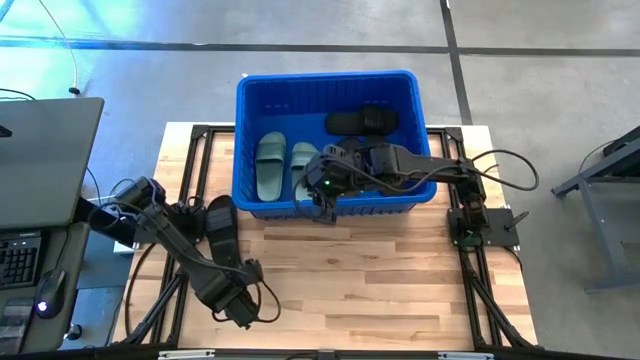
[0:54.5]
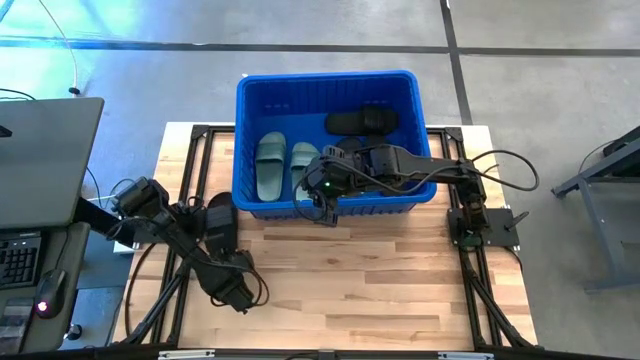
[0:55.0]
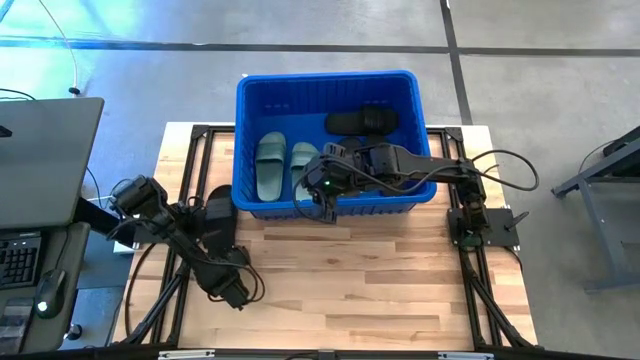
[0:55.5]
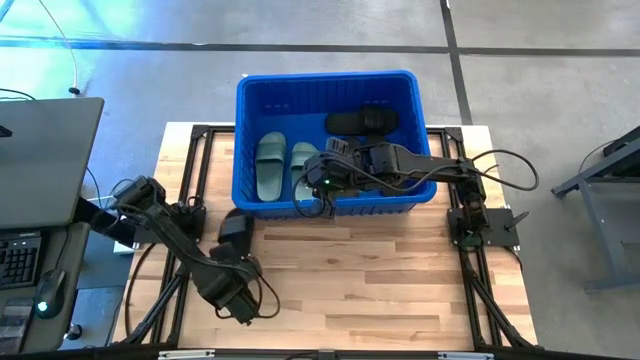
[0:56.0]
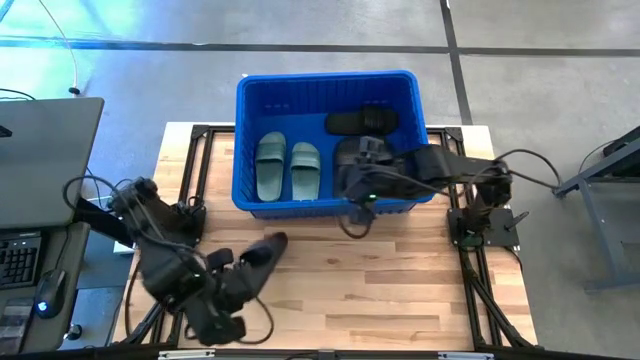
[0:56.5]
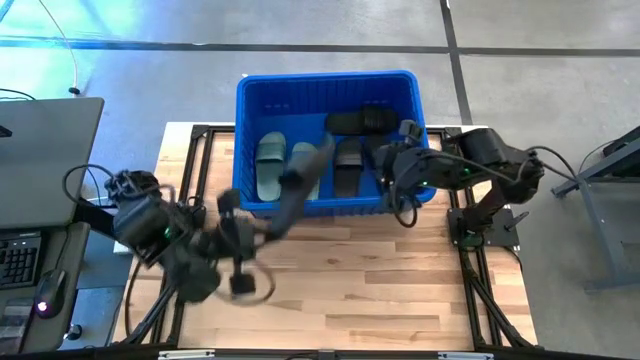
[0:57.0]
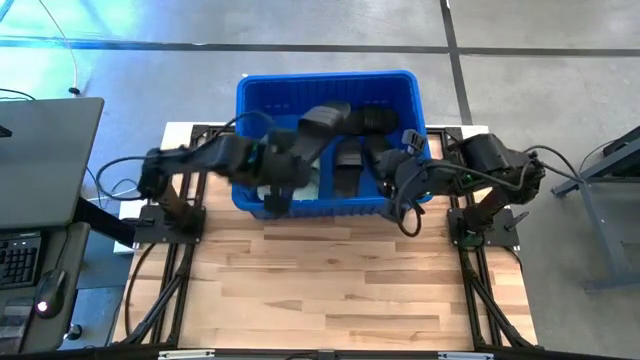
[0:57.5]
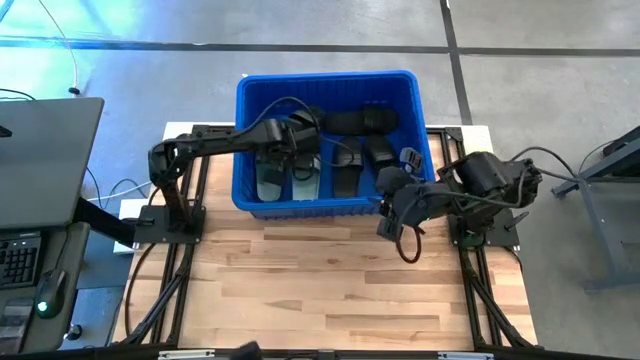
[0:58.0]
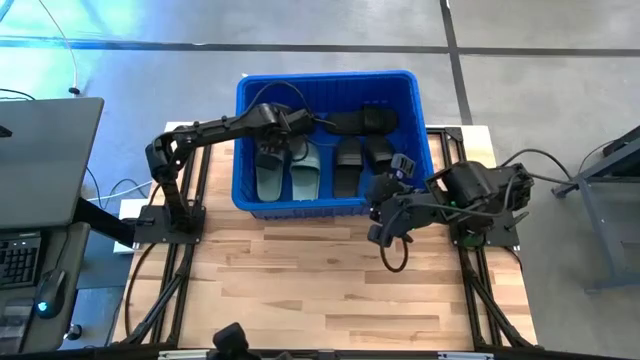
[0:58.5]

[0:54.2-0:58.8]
Task: Pick and place slides into bin
Put the black slide into the blue bin

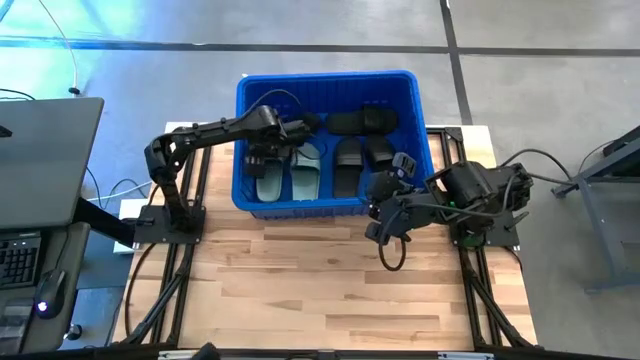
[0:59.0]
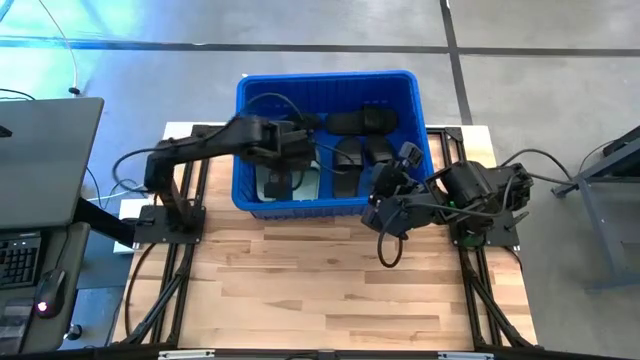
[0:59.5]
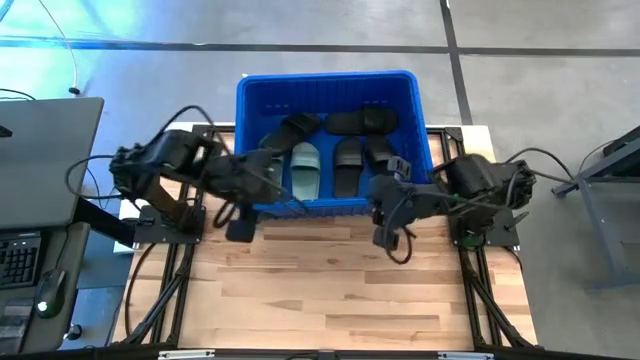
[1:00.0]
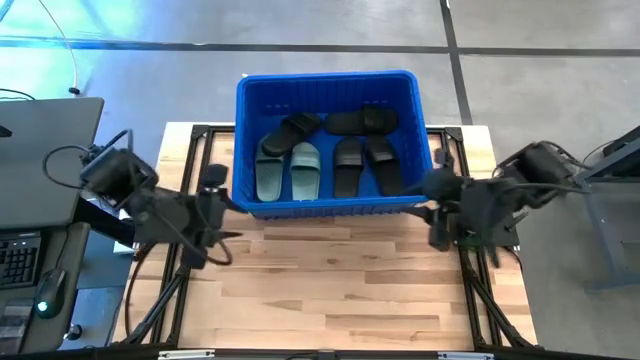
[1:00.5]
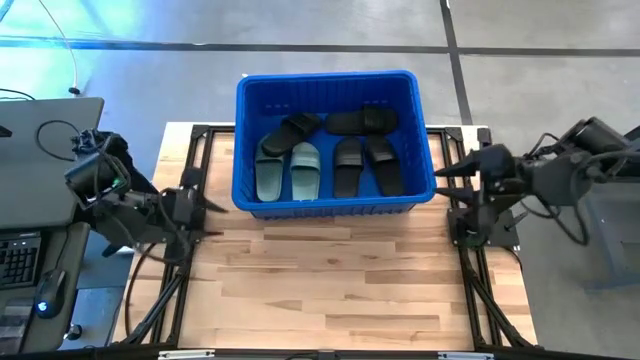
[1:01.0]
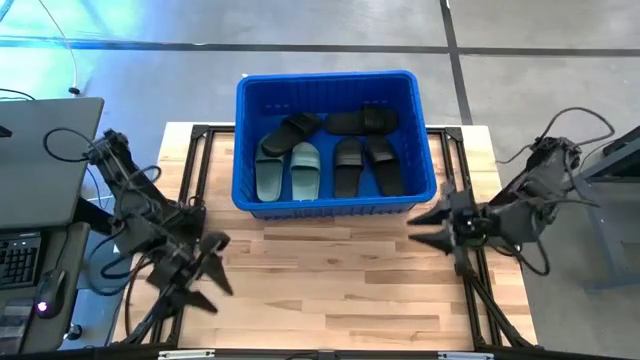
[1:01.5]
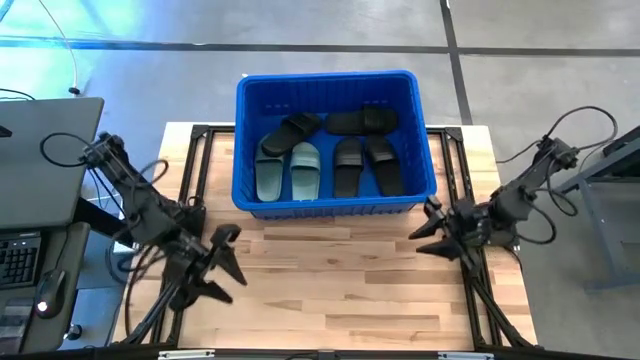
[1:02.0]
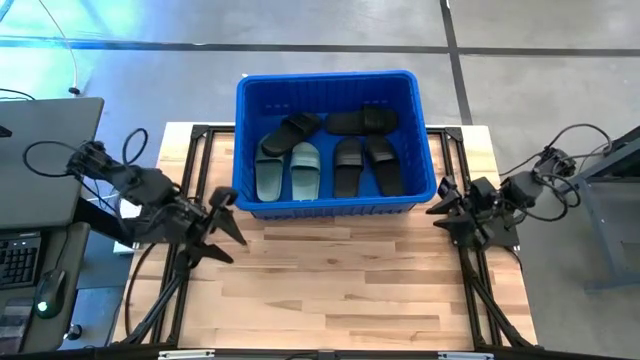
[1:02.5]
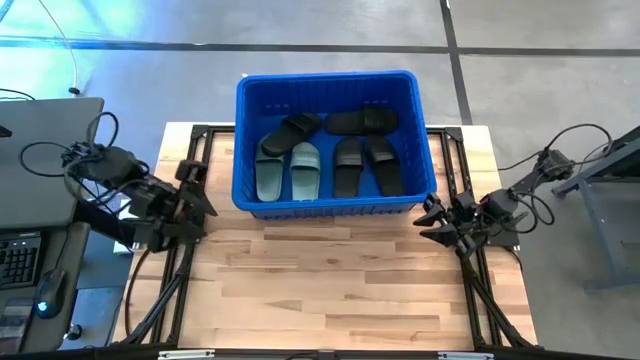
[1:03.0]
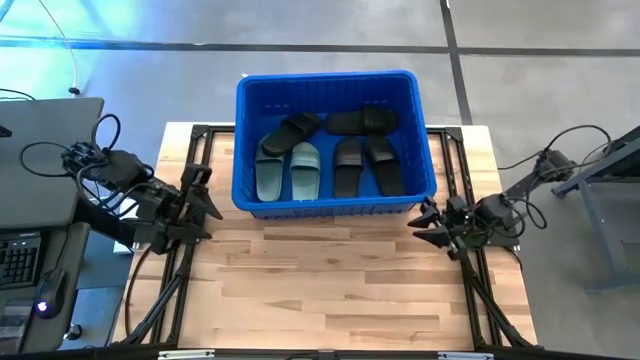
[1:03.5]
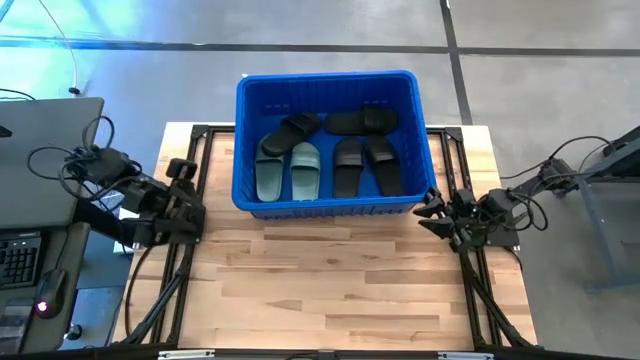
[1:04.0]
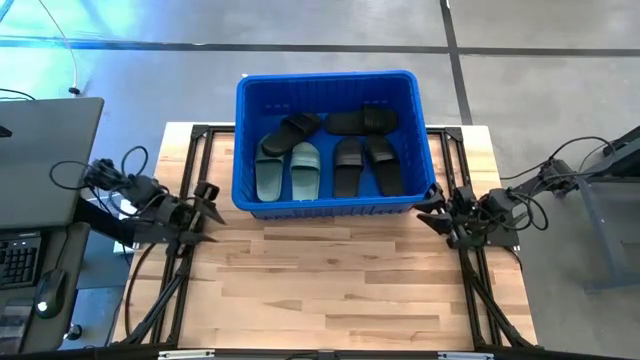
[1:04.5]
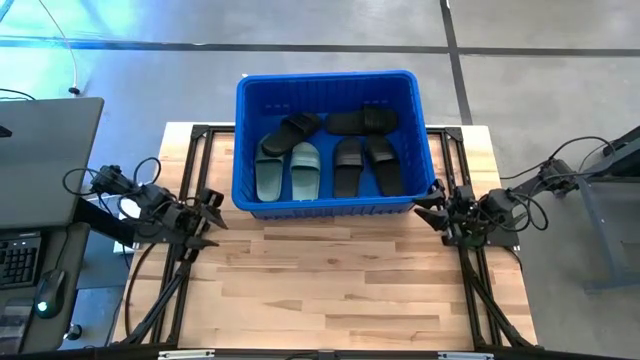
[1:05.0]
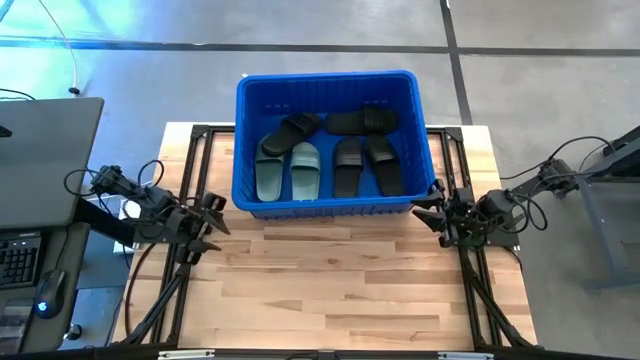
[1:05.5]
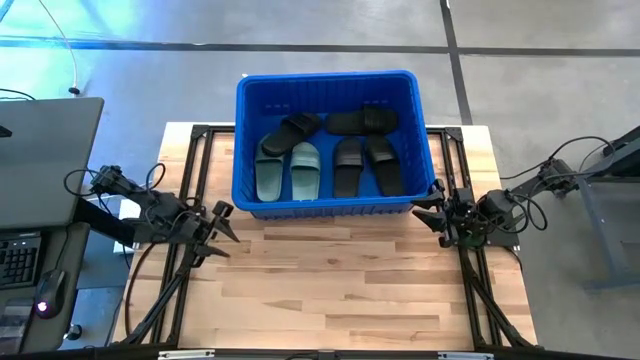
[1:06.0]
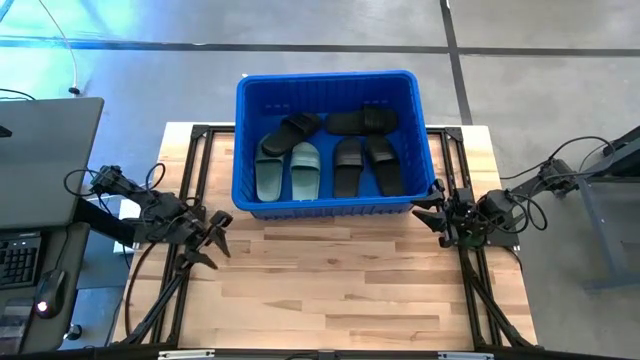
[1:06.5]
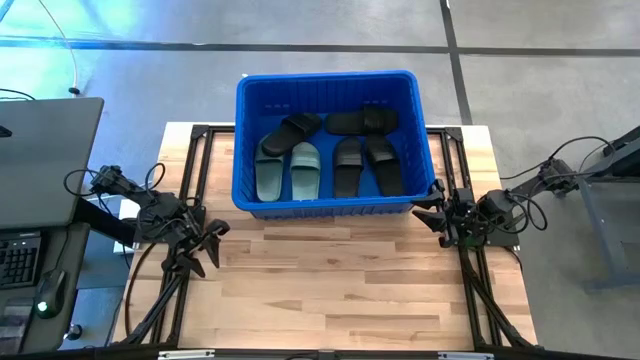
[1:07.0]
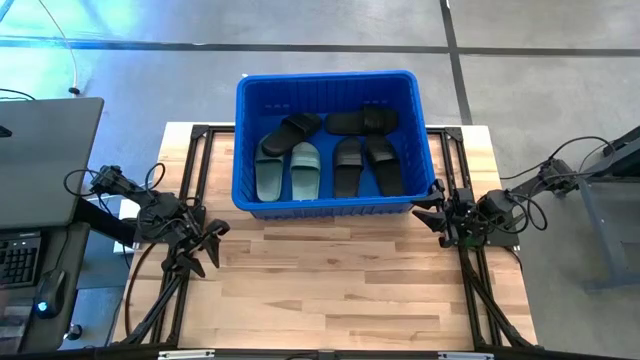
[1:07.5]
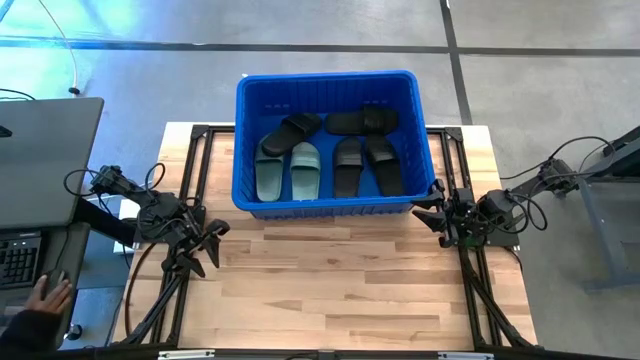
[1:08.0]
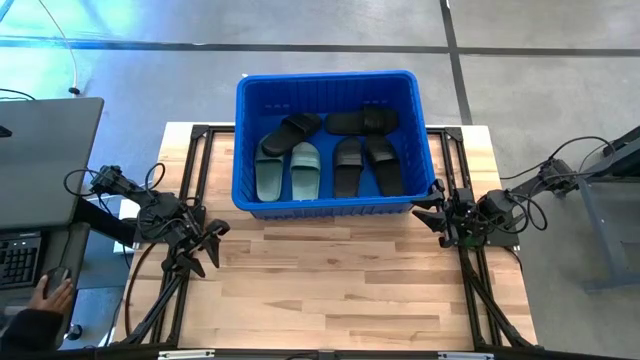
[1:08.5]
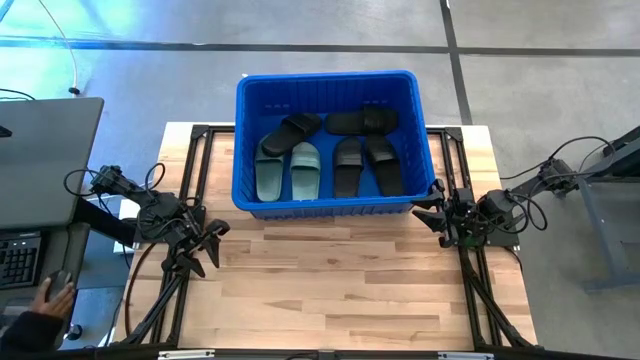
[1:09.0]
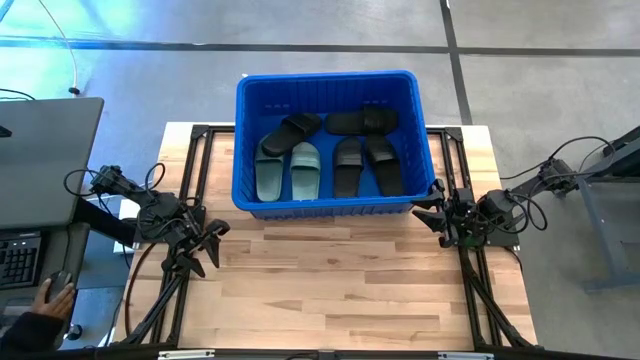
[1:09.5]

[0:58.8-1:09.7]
Return to Home Position

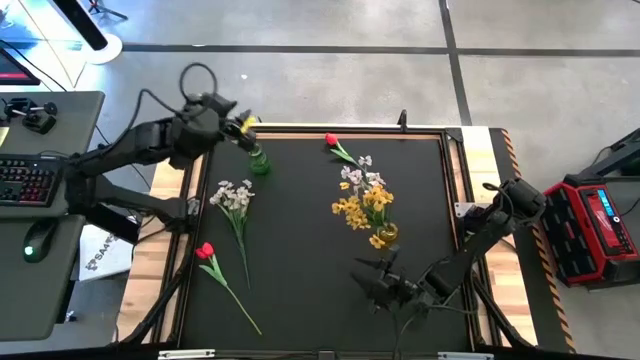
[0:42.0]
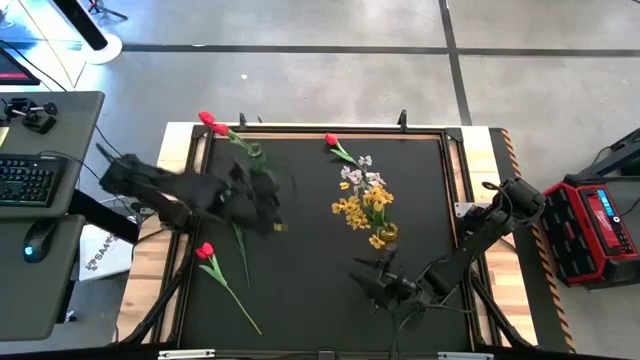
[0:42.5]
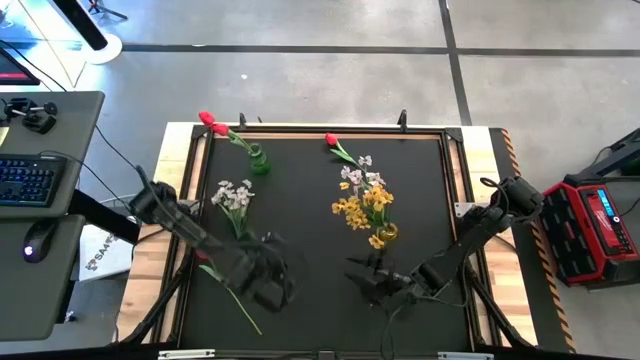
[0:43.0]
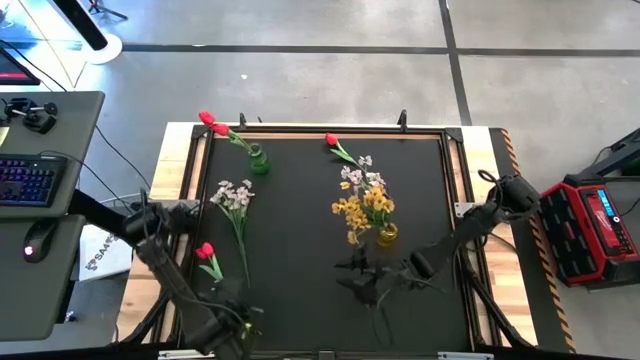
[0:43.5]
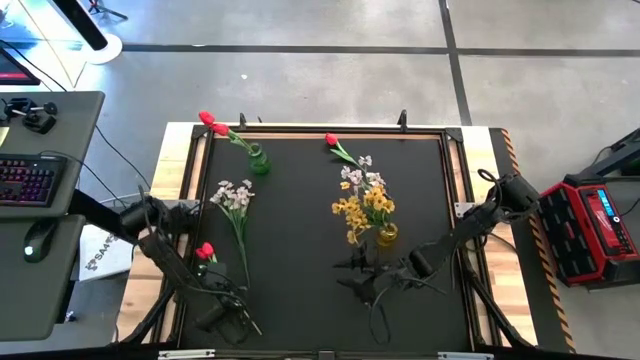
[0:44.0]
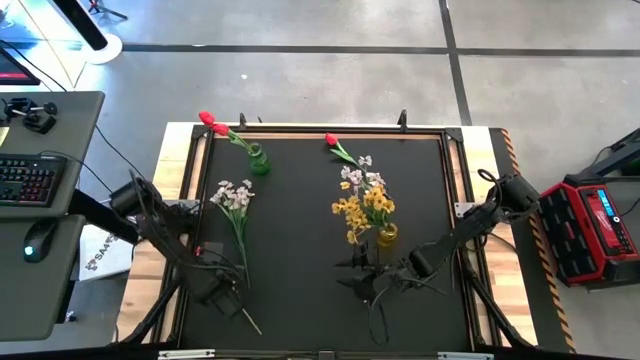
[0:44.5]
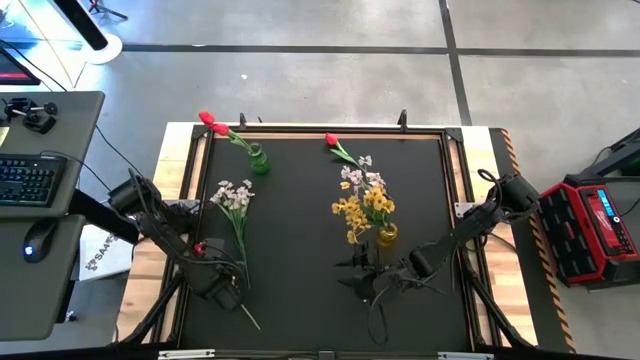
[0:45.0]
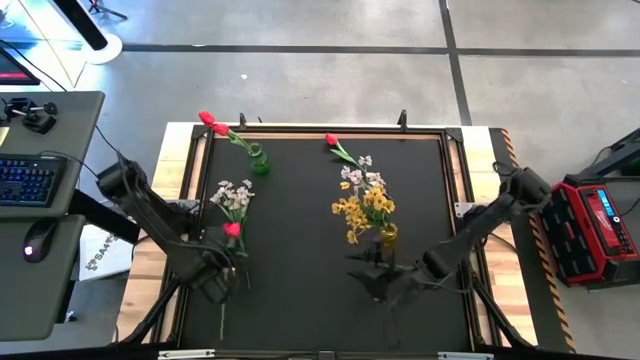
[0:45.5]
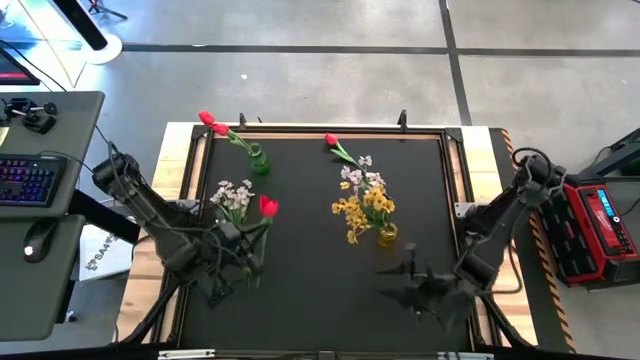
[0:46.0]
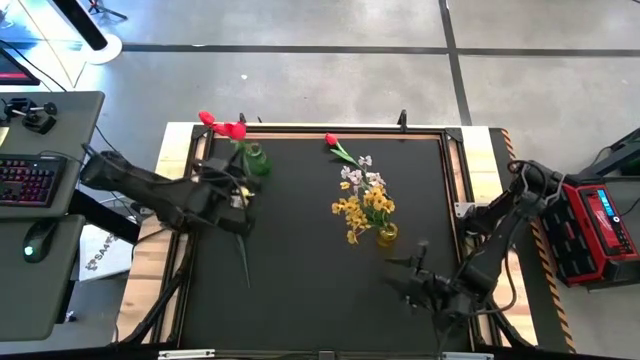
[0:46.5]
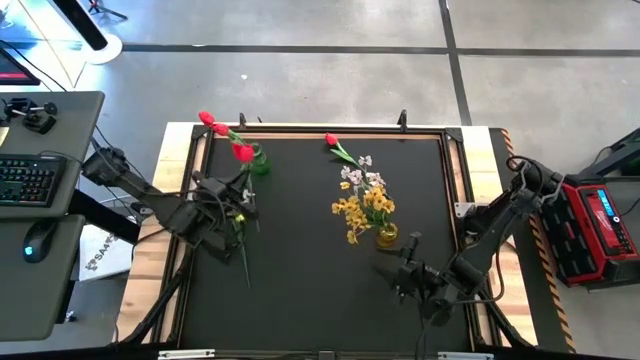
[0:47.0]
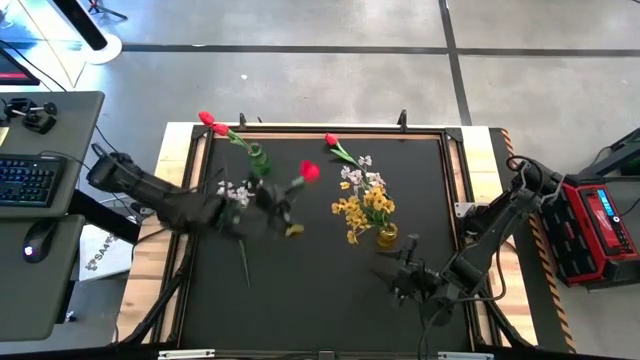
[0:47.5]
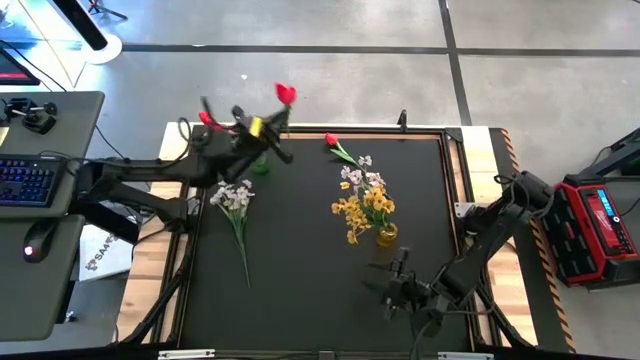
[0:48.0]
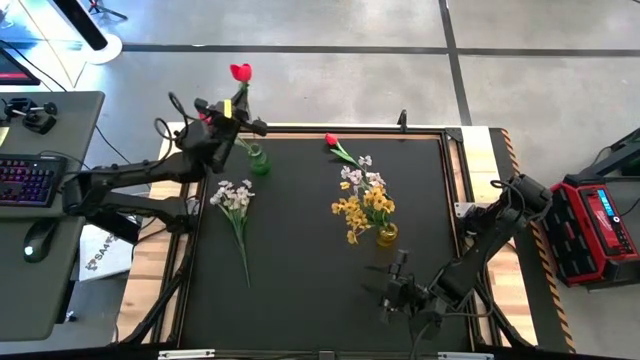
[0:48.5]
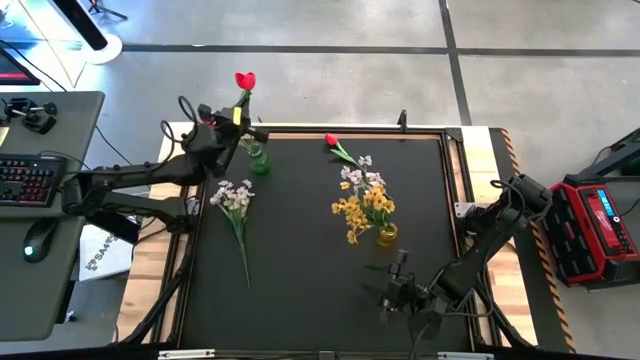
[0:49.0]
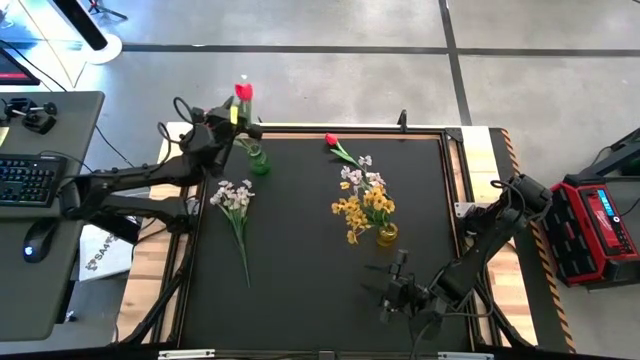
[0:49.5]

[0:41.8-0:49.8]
Task: Sort flowers into vase by color
Put the bottom red tulip in the green vase
